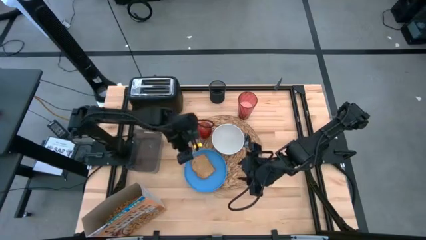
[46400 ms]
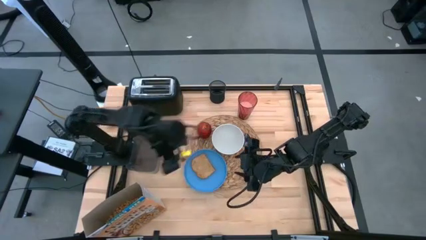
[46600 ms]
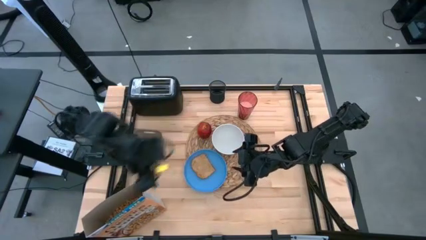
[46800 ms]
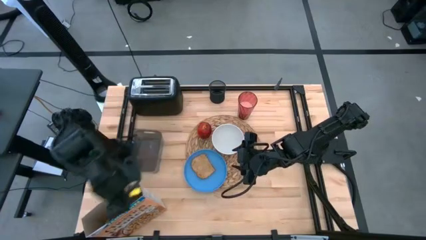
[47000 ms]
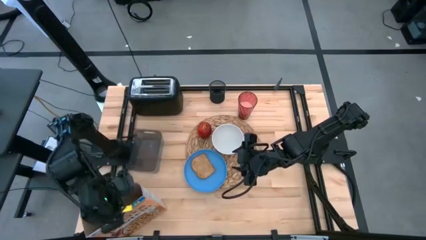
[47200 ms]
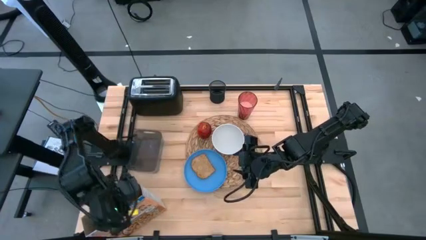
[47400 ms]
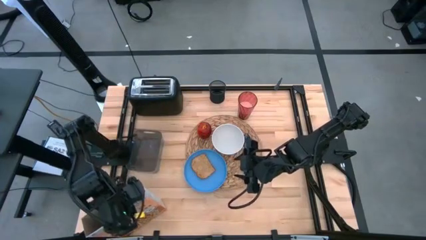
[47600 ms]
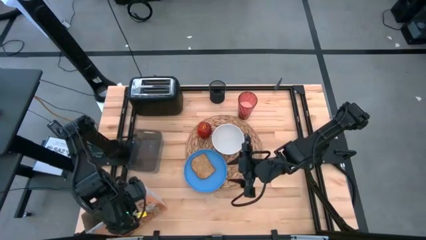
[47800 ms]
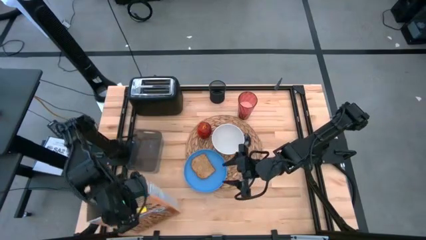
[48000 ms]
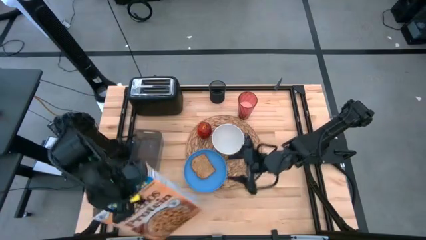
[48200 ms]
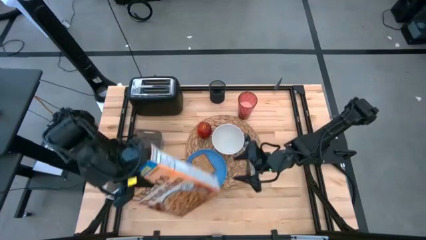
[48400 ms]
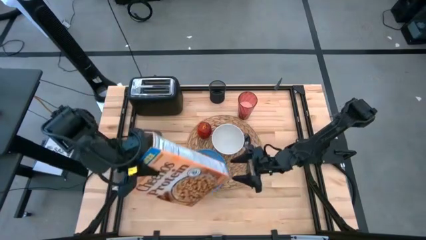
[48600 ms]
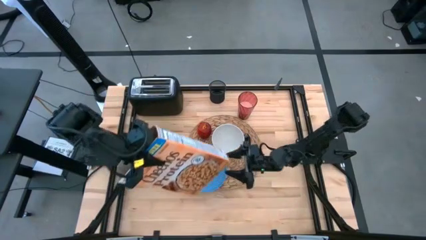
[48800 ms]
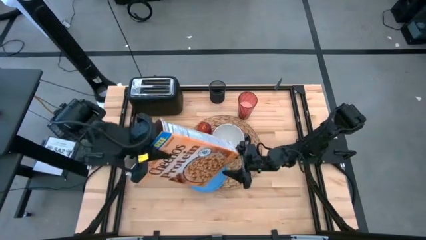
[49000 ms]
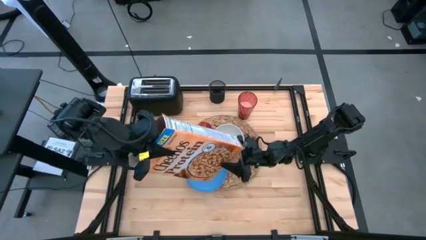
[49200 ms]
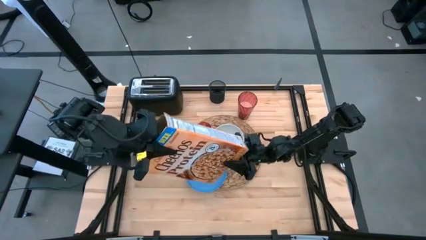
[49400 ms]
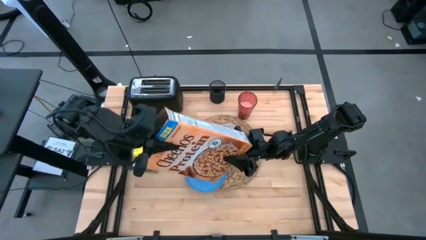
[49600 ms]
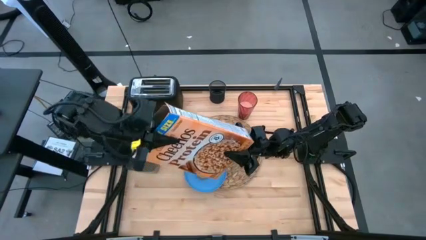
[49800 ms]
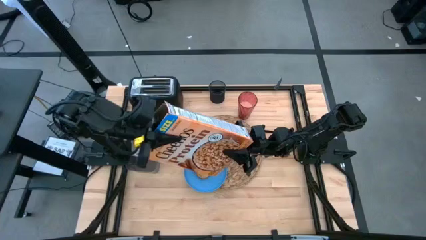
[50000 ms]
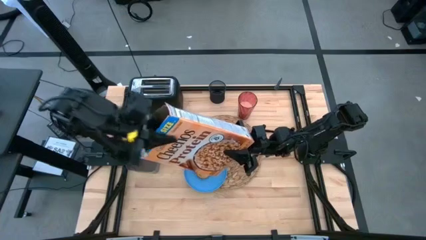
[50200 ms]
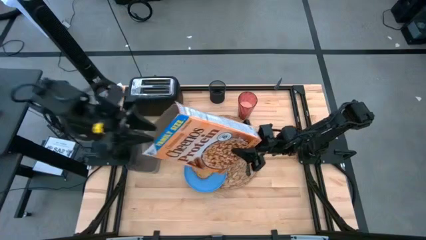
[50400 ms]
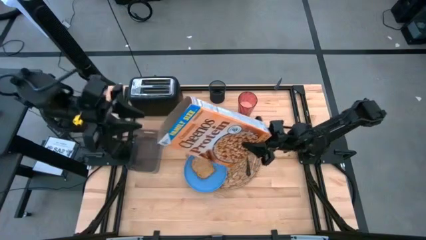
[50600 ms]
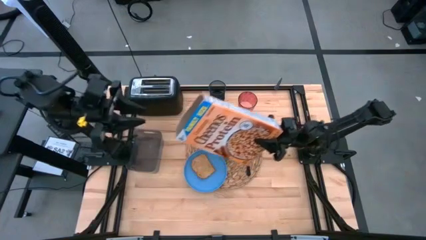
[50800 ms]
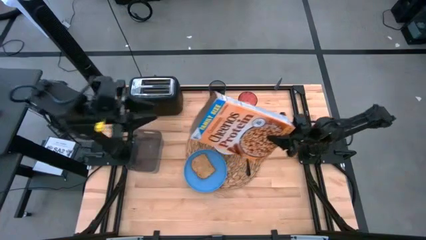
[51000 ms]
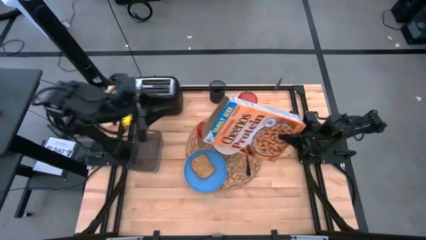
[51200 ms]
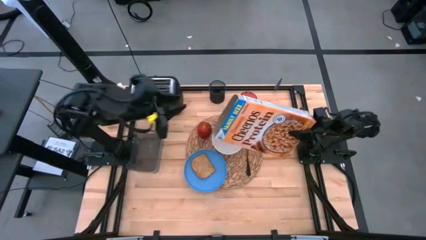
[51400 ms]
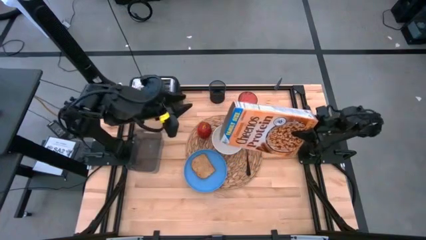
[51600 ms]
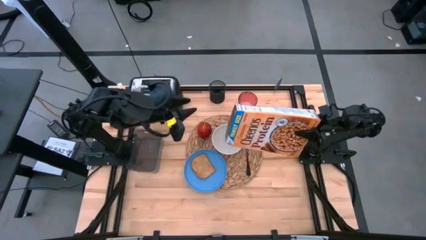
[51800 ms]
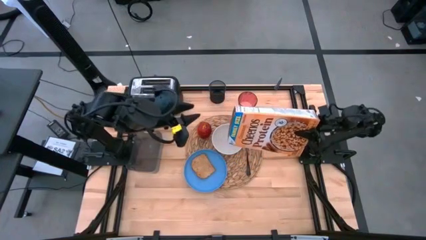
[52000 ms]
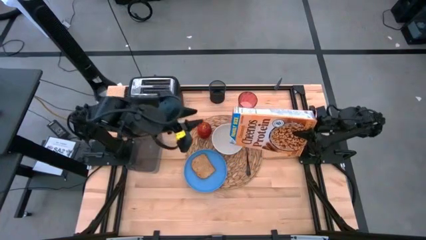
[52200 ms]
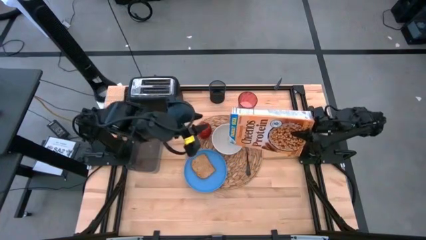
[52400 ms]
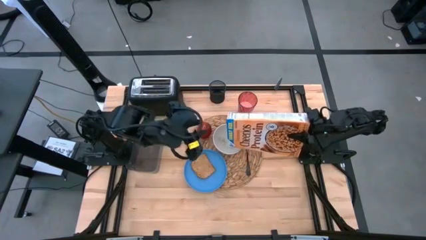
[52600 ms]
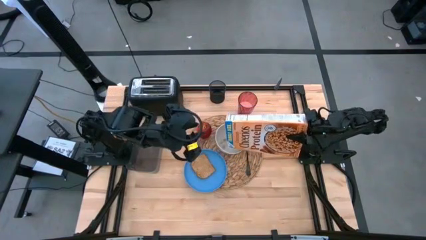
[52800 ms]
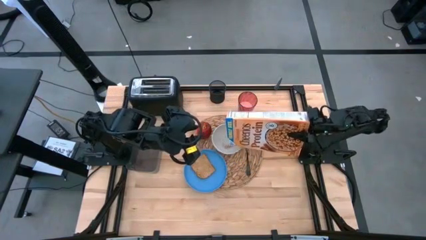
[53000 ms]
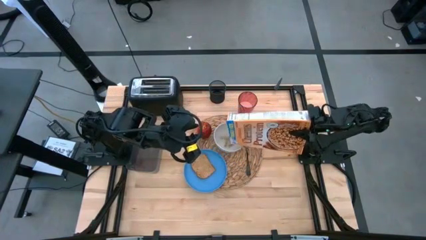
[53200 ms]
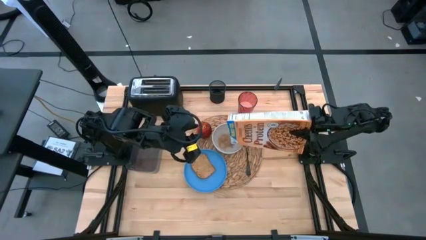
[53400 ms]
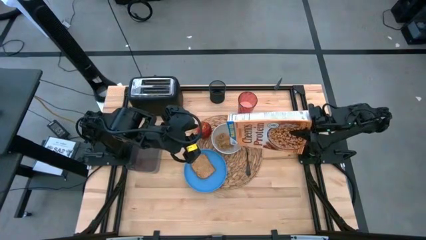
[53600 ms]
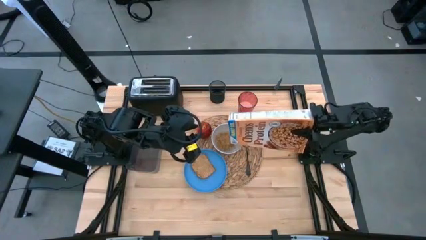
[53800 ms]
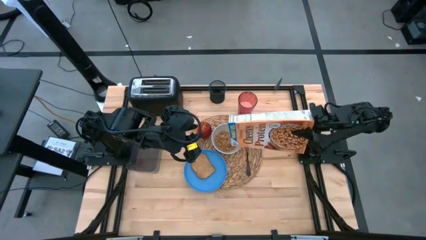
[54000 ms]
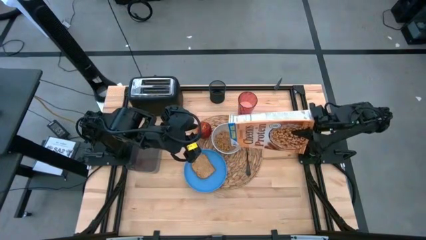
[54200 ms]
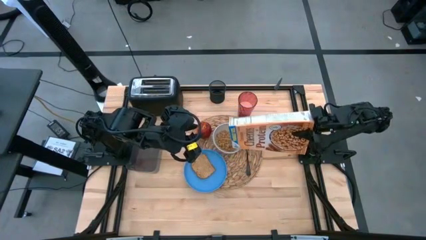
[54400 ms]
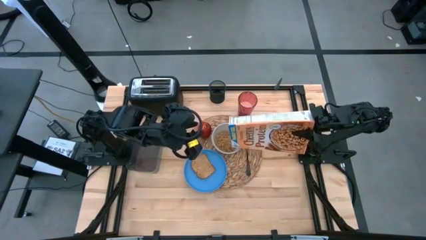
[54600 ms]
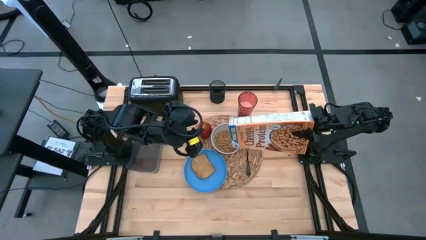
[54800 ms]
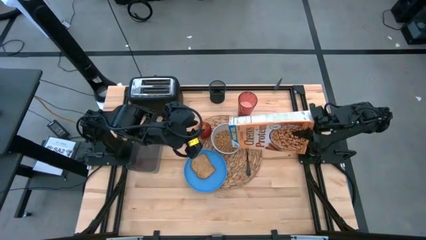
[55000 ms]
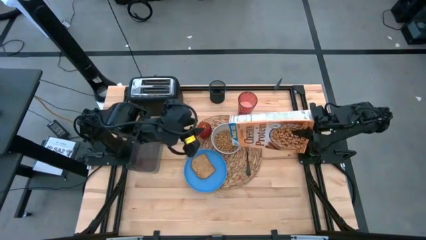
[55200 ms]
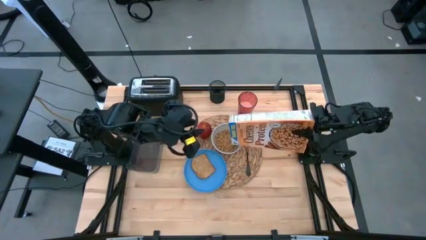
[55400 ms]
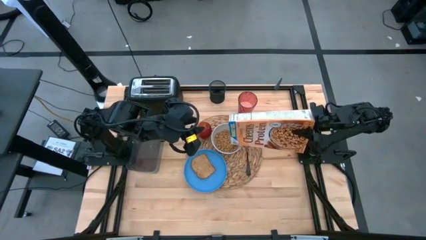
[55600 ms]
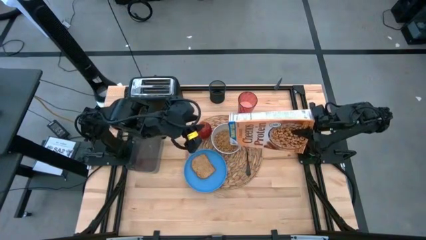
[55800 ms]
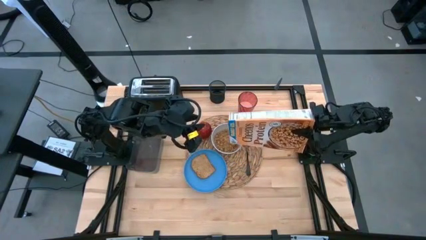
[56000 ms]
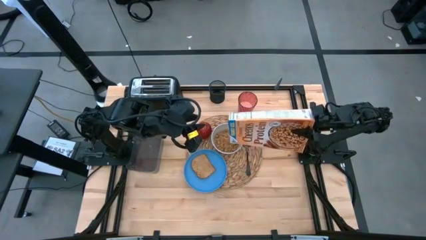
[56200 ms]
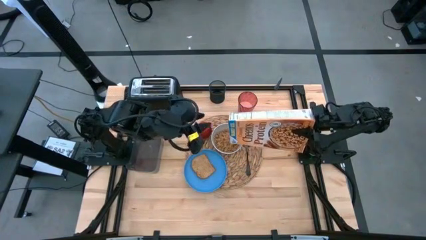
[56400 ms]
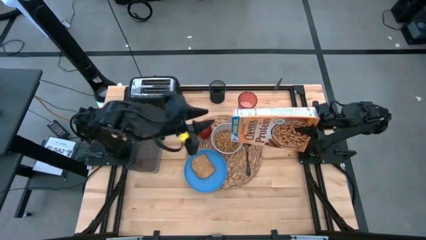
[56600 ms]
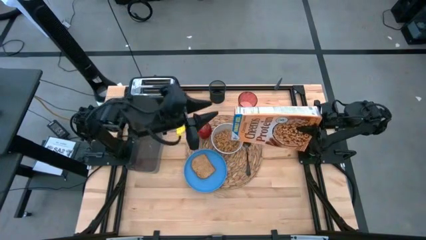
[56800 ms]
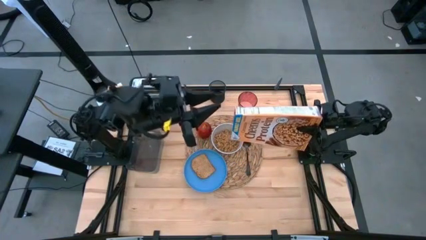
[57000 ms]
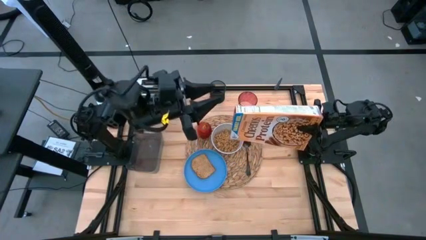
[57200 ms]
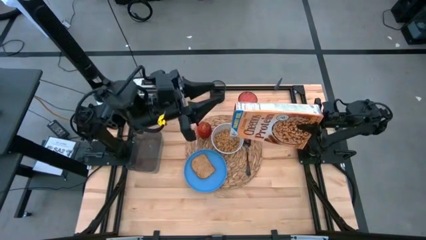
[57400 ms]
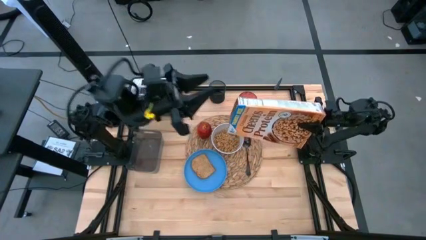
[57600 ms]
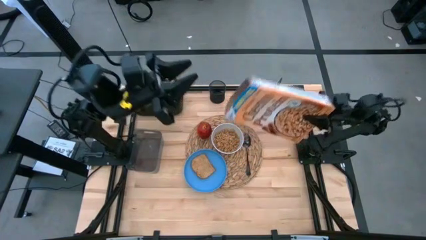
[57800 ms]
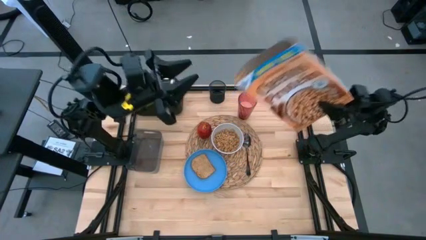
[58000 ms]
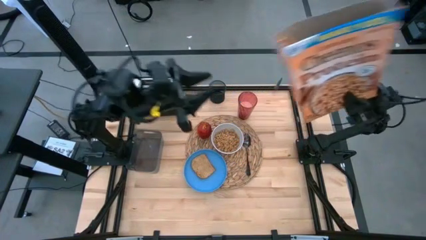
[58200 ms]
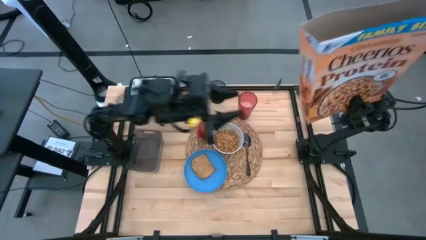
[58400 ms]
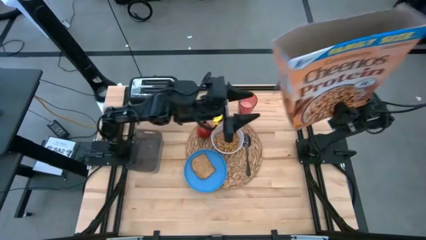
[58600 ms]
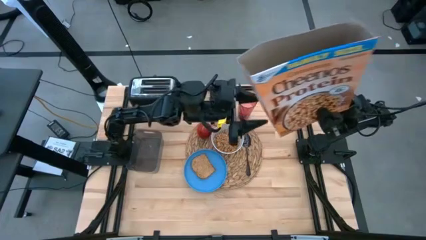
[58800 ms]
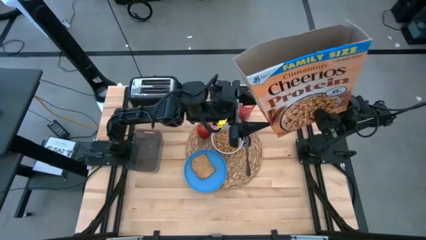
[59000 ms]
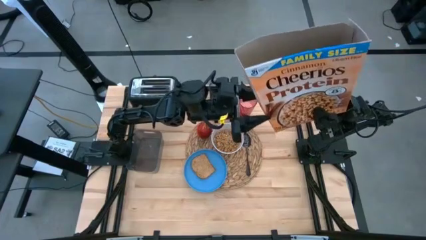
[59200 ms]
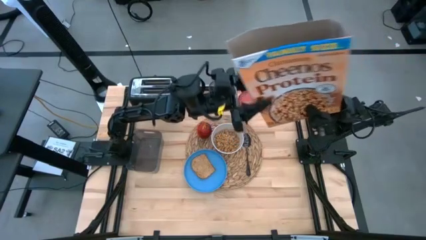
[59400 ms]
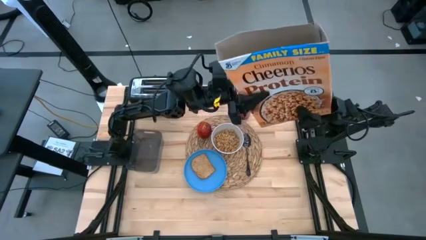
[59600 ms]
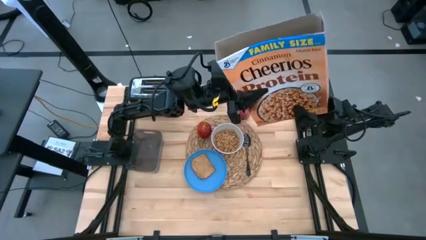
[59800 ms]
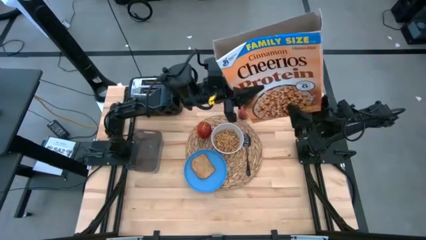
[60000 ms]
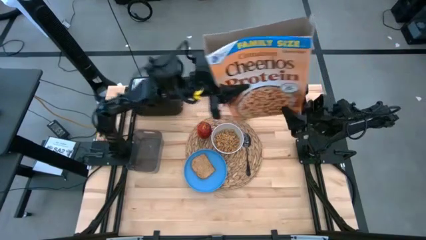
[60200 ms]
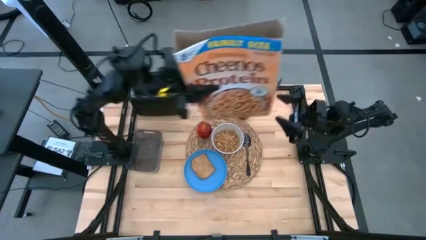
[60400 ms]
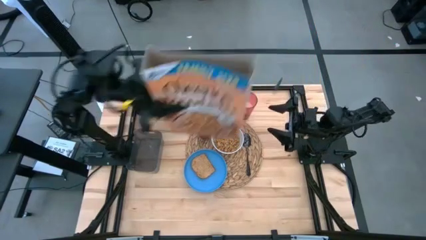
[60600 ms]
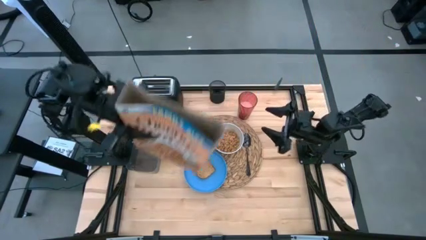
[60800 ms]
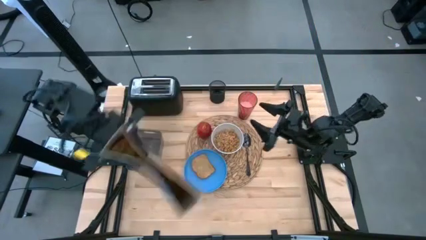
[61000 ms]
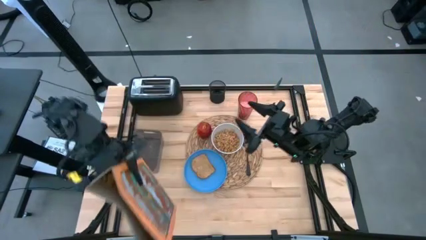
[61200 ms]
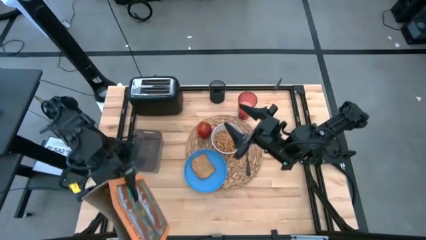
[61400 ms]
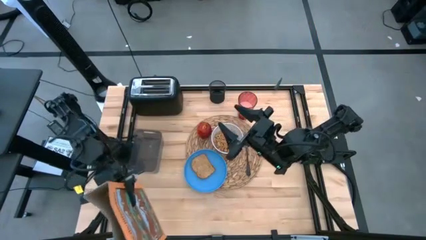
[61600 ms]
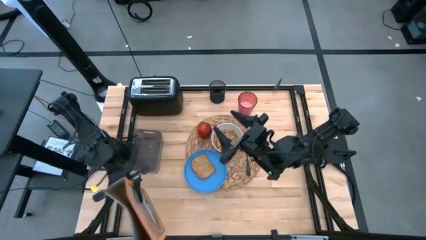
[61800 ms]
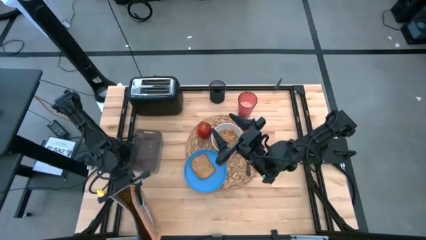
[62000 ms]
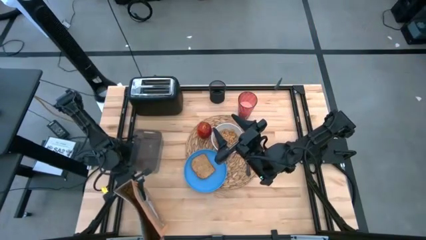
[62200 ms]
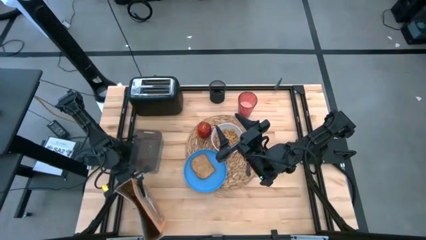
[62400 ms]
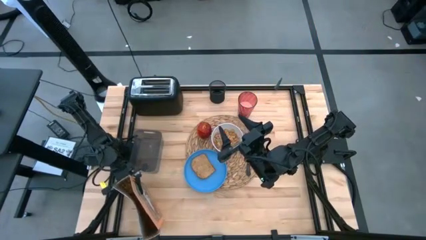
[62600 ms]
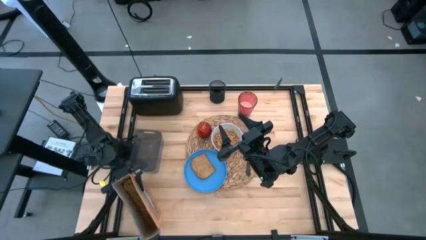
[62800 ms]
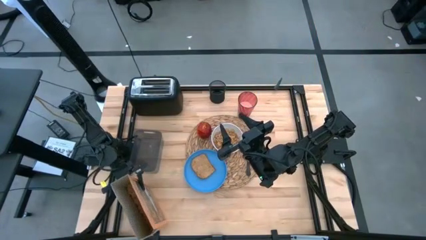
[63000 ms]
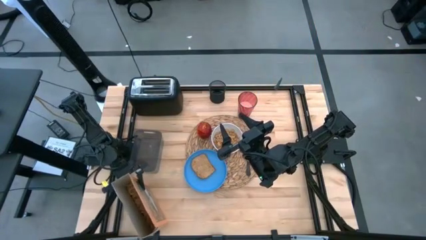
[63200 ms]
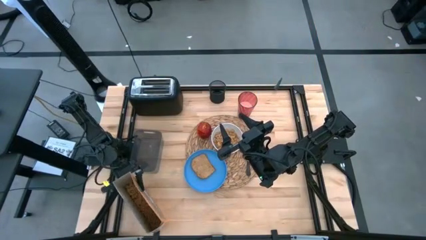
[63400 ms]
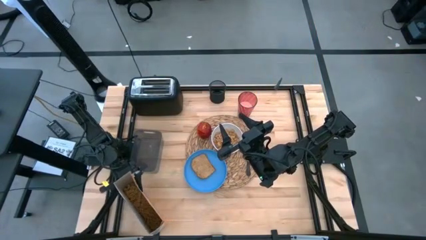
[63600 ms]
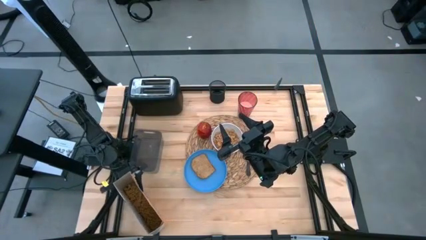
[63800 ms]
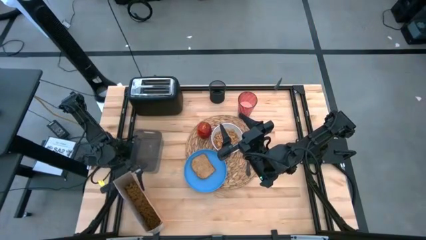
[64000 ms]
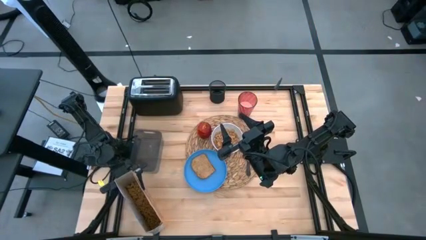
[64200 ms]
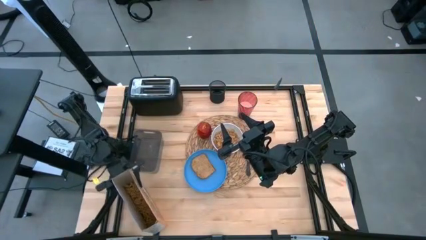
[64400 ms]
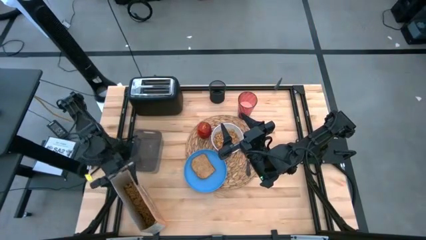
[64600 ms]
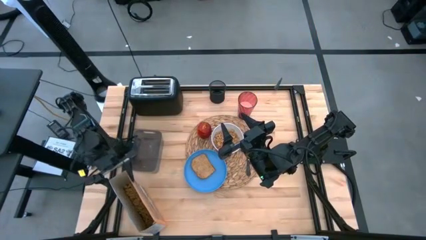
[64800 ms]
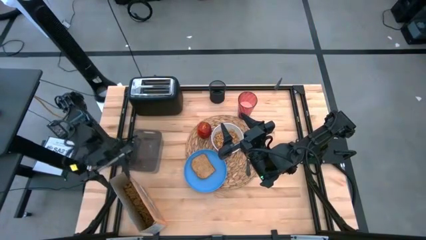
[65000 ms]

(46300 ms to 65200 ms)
Task: Arrange a breakfast setting
Pour the cereal from the cereal box into the white bowl
